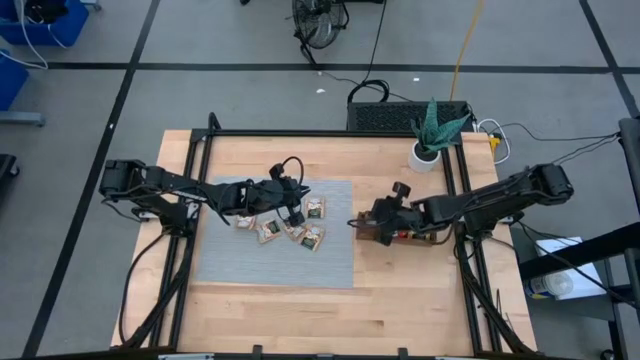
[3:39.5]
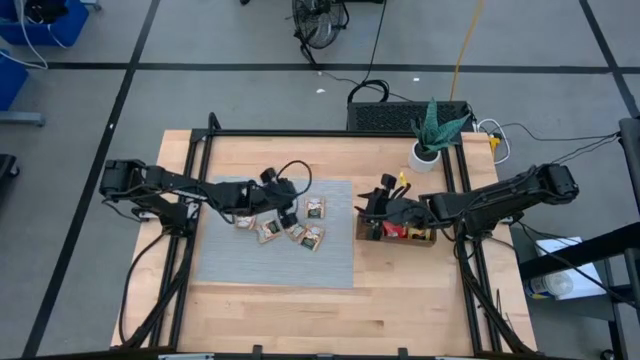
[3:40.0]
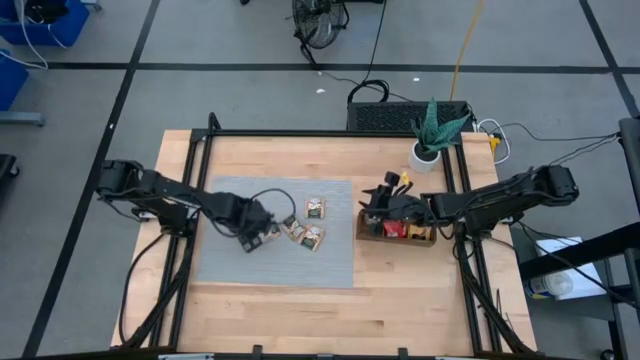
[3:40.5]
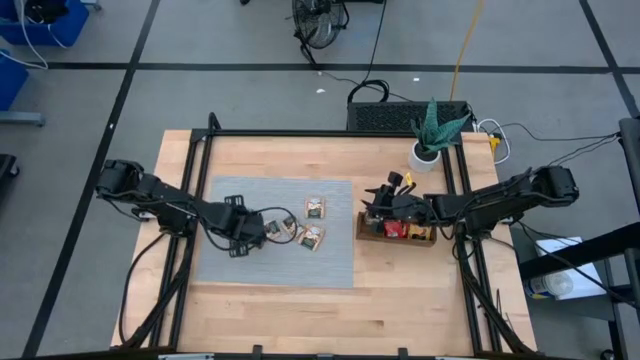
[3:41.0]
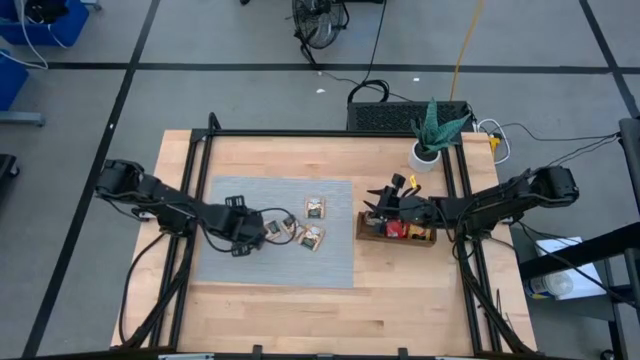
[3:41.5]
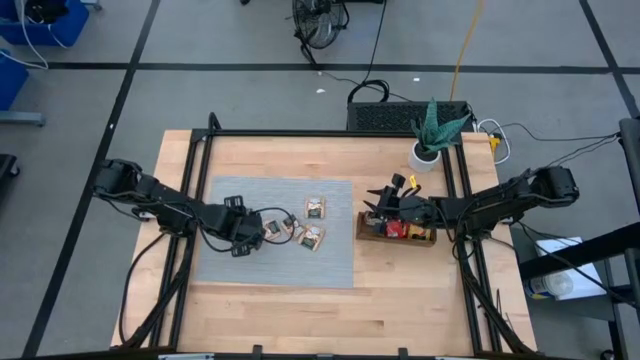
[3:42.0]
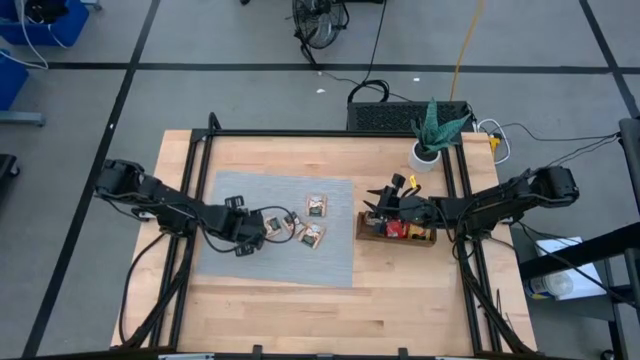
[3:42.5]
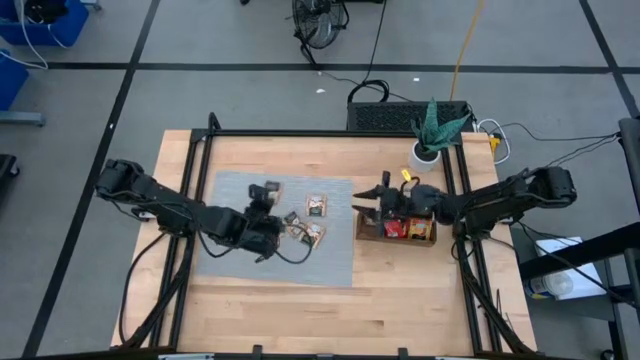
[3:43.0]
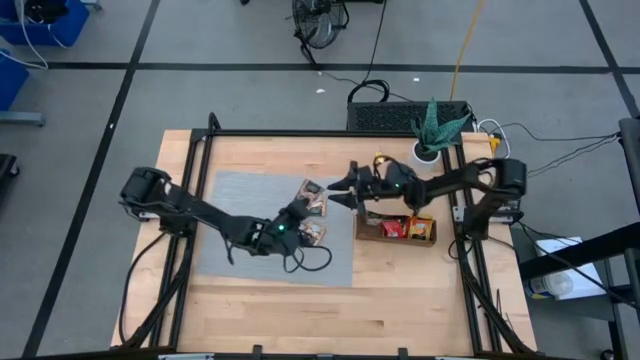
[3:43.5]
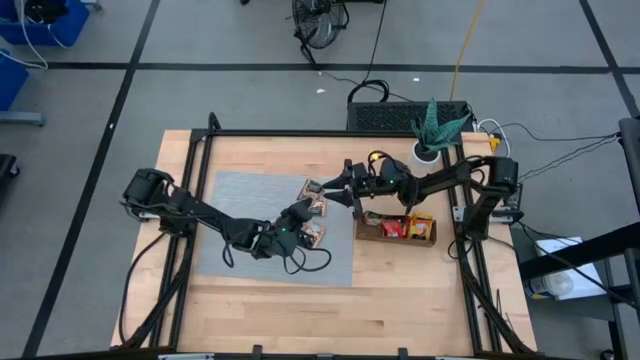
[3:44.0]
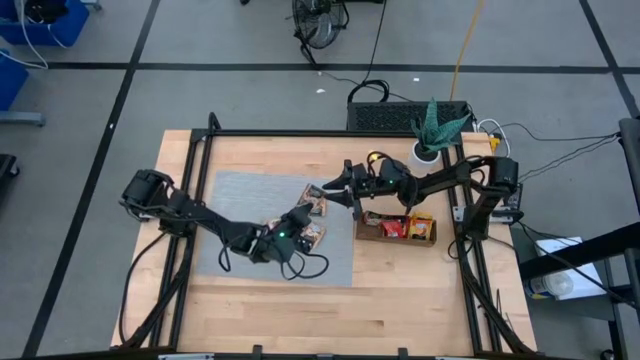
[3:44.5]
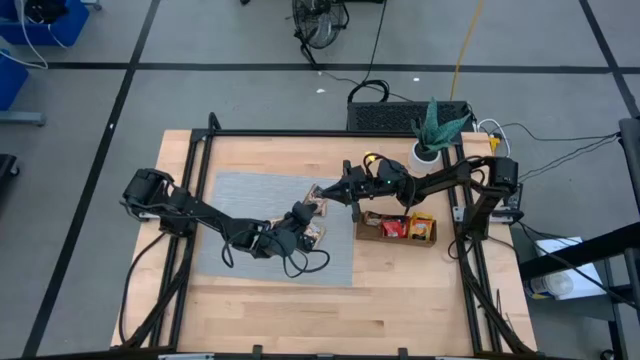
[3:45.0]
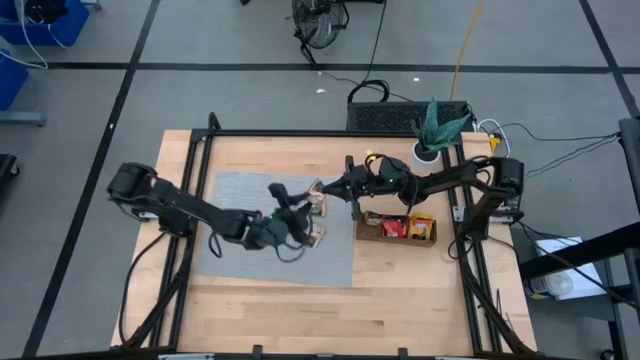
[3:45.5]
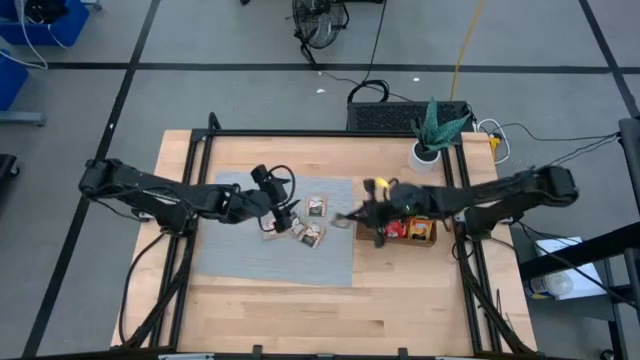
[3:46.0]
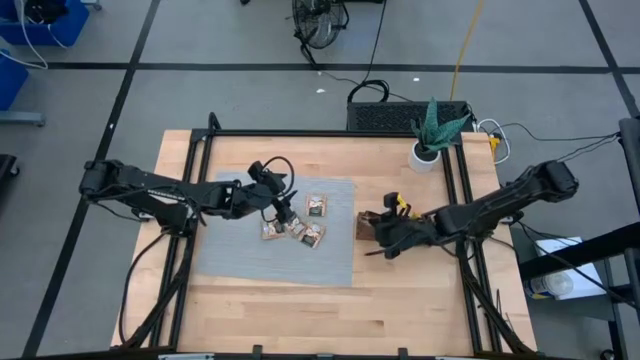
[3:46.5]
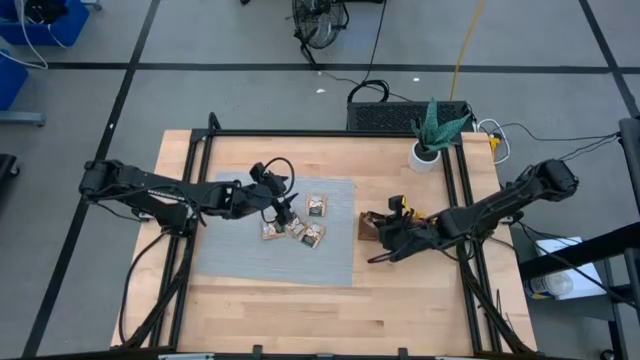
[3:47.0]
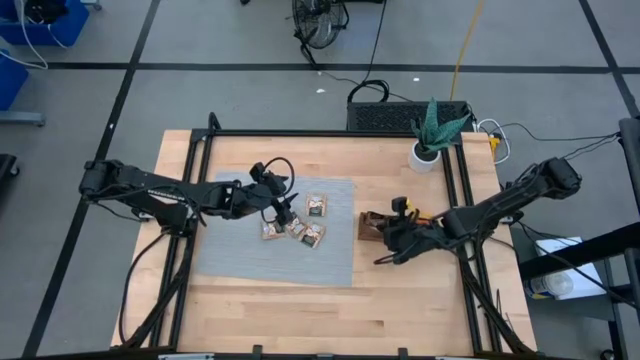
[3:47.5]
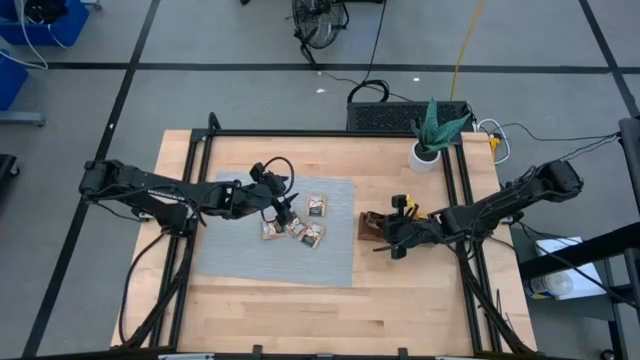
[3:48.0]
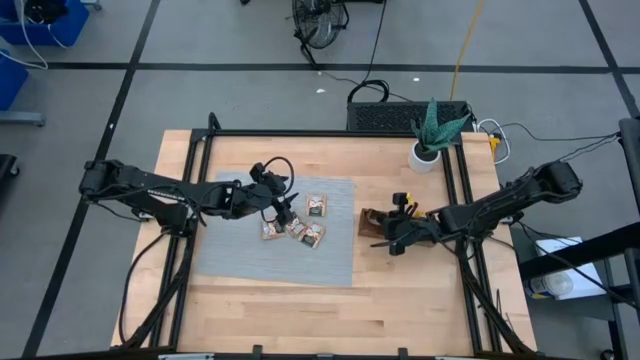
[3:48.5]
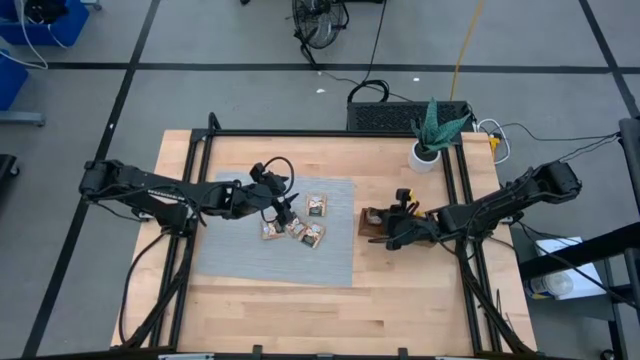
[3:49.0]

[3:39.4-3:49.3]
Task: Pick & Place Tea
Put the brown tea bag into the left section of the wooden organizer

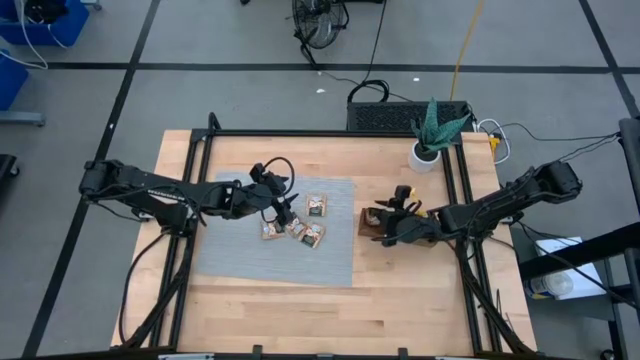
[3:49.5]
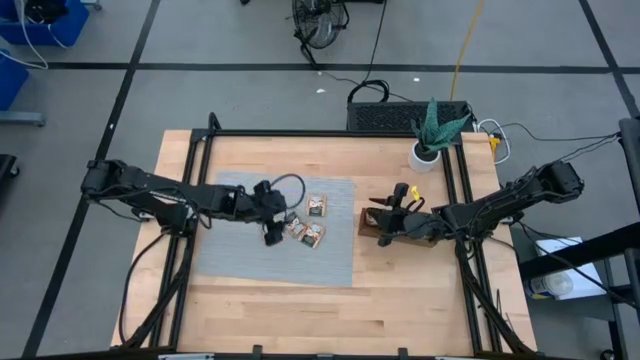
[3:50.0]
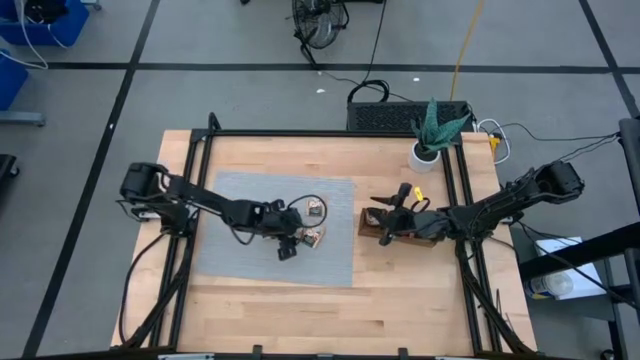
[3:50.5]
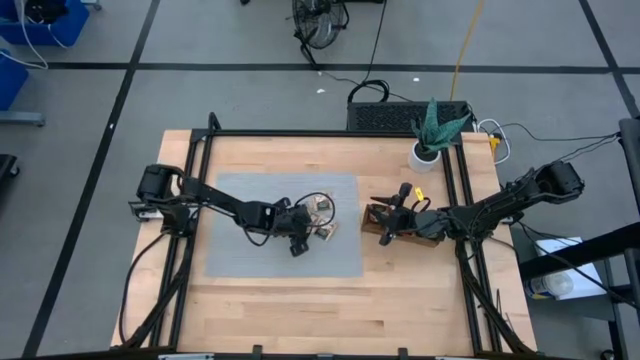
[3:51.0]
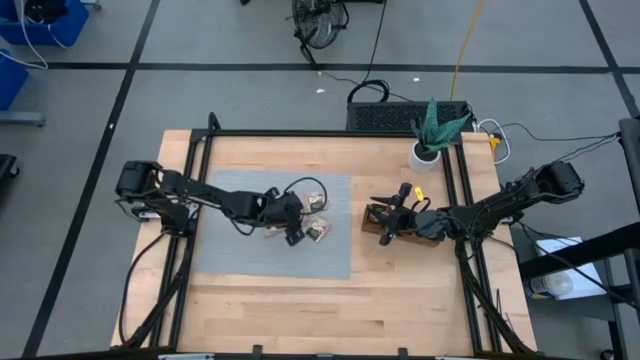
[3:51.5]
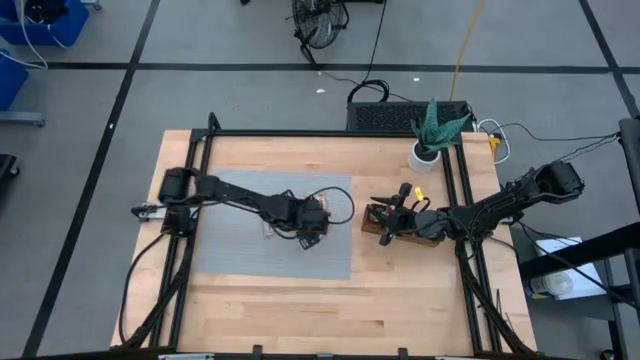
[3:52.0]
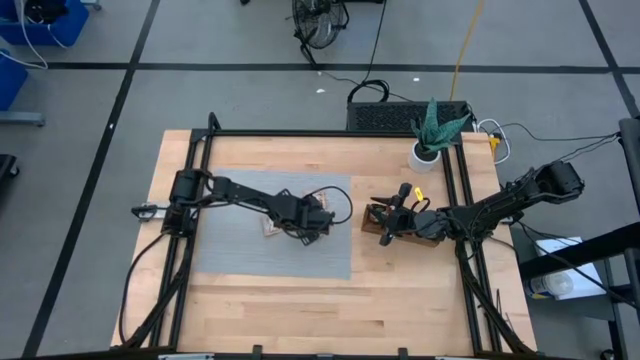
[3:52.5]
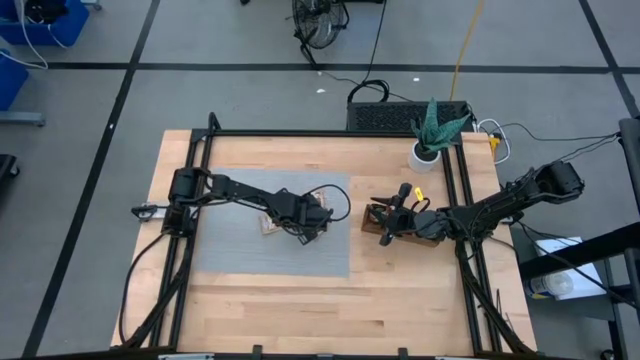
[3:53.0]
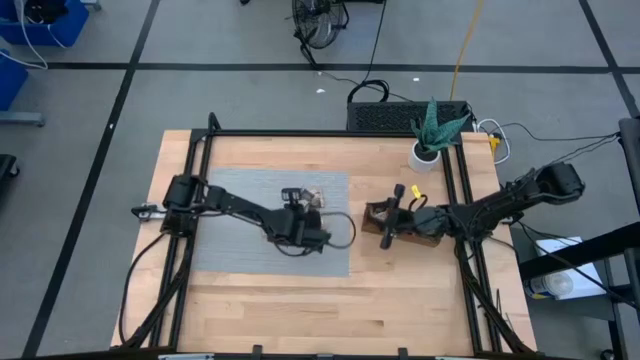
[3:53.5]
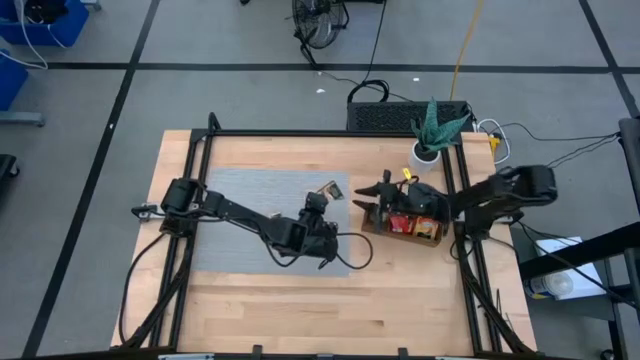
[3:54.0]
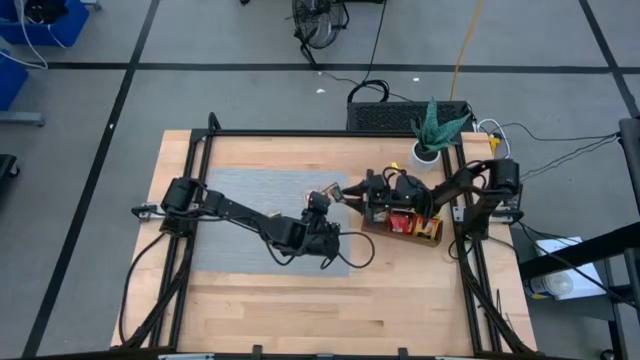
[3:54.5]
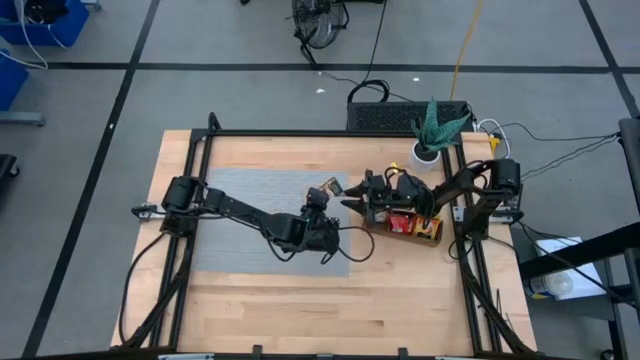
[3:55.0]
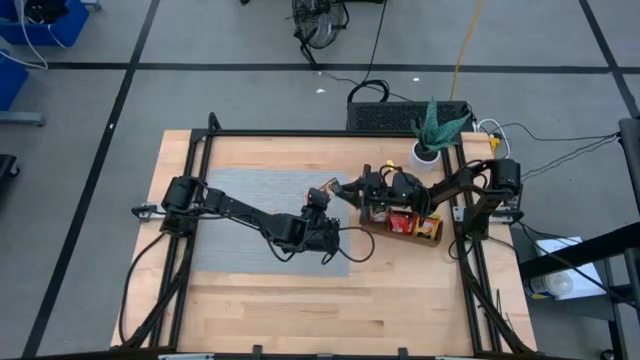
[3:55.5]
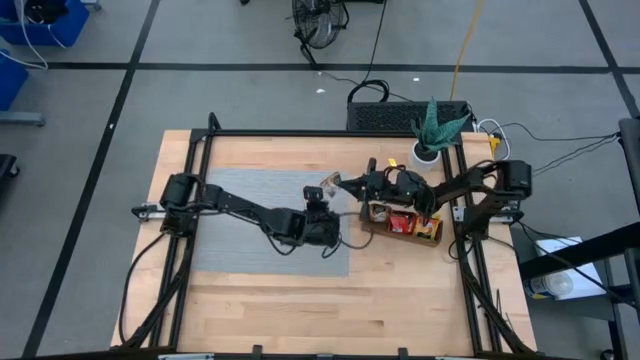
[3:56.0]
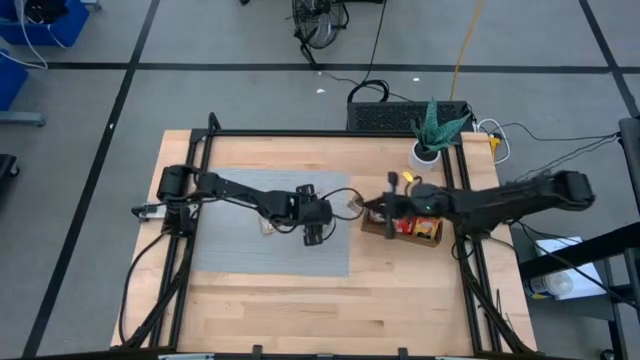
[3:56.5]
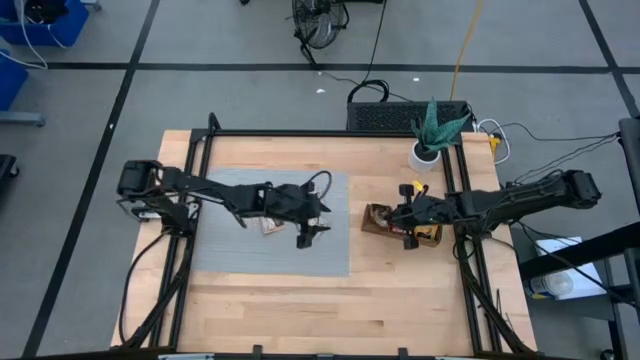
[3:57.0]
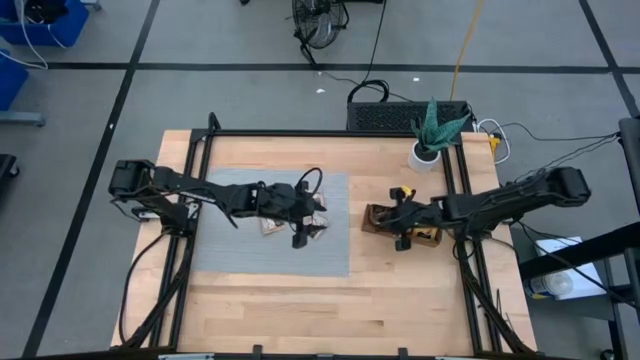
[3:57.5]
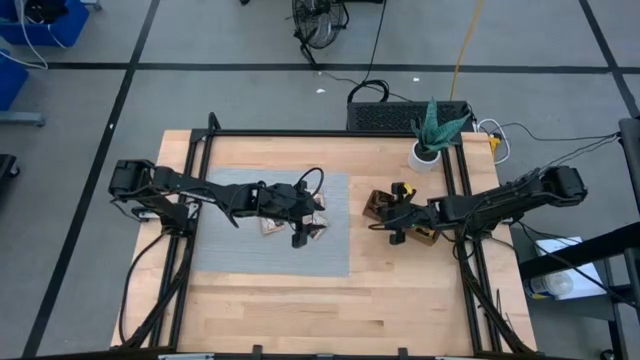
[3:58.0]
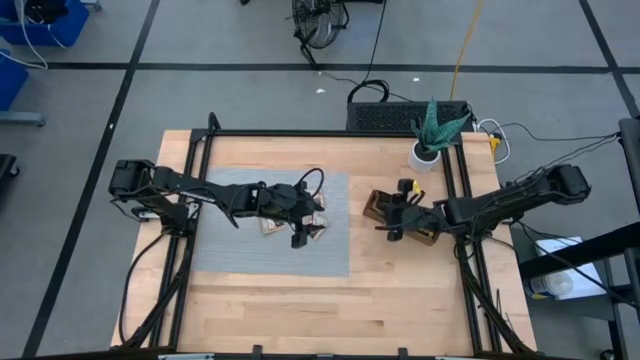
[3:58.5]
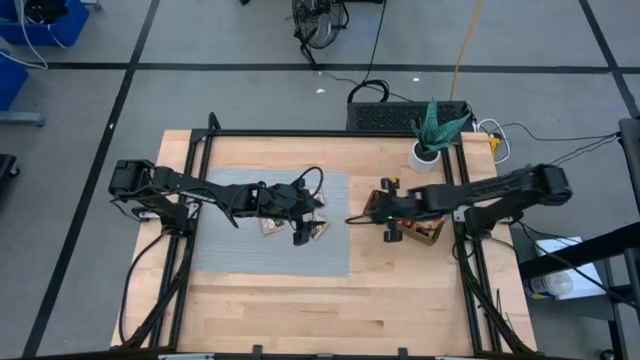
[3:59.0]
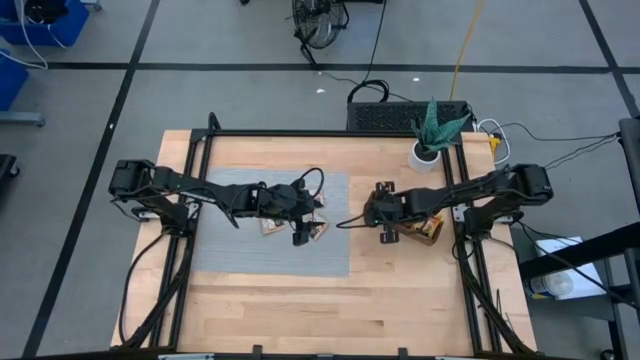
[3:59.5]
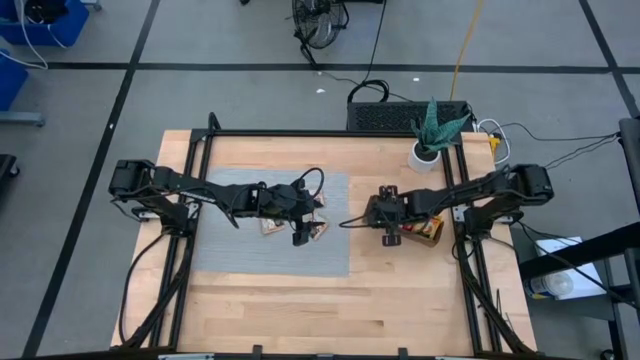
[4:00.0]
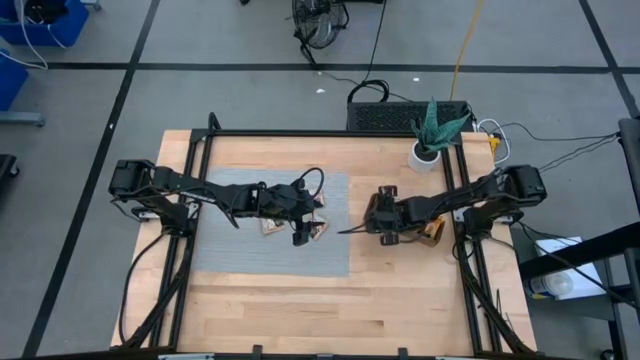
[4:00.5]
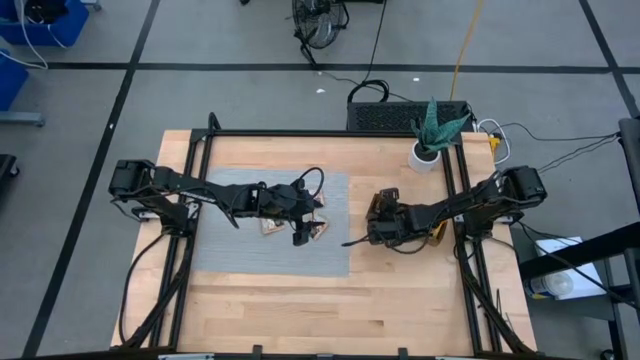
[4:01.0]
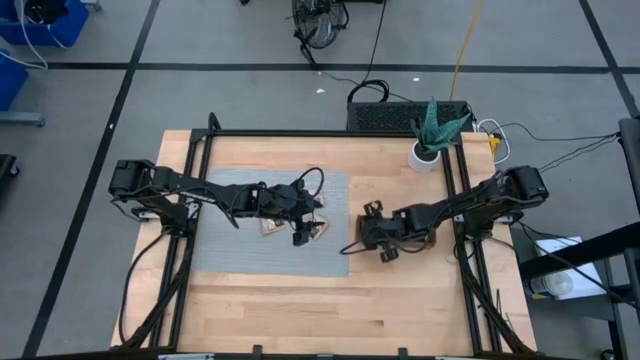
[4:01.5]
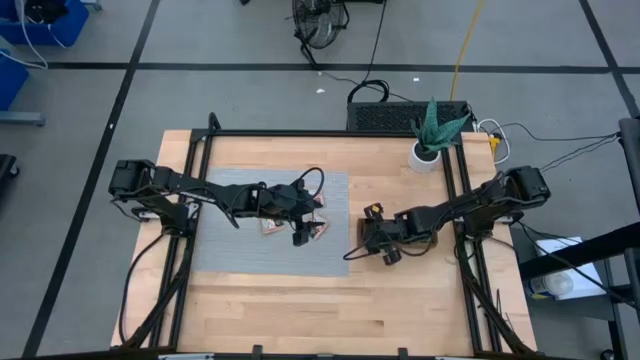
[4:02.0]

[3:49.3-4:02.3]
Put the brown tea bag into the left section of the wooden organizer
